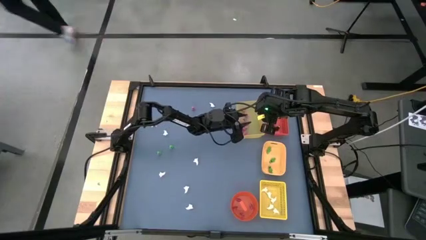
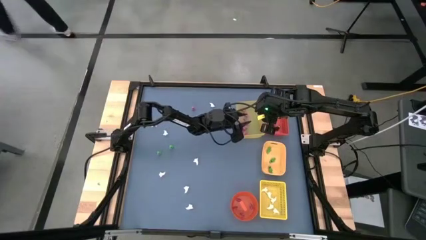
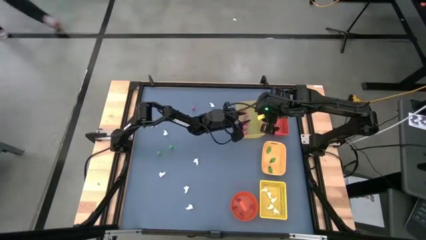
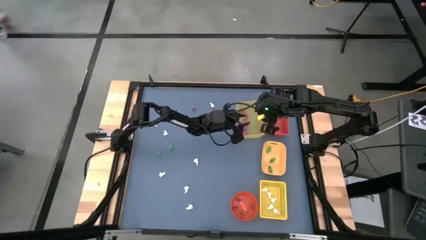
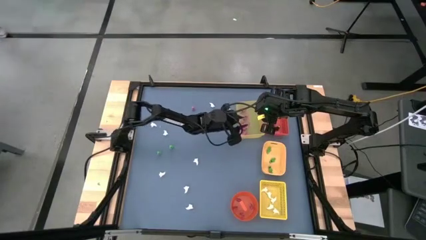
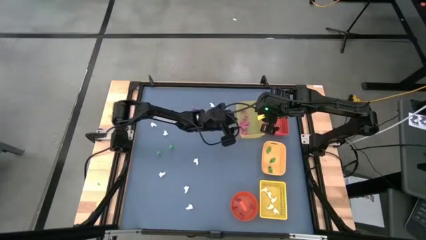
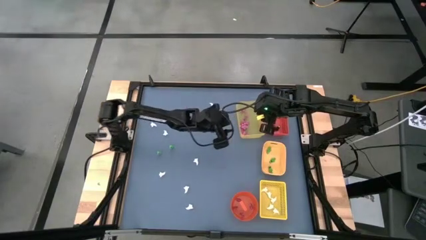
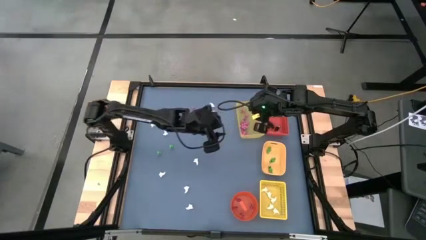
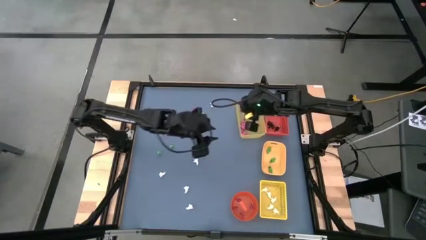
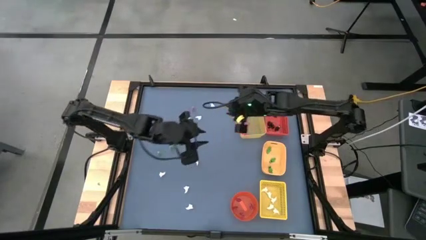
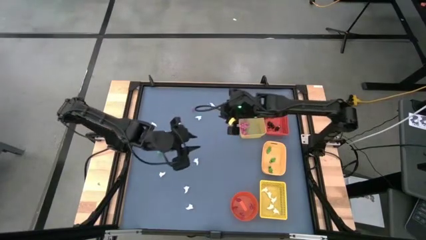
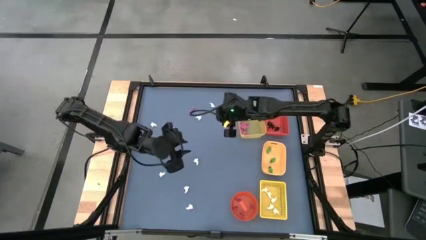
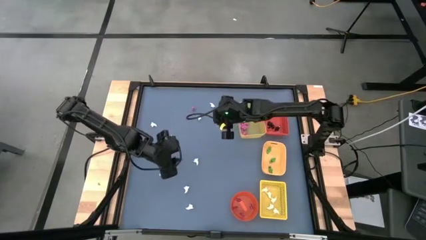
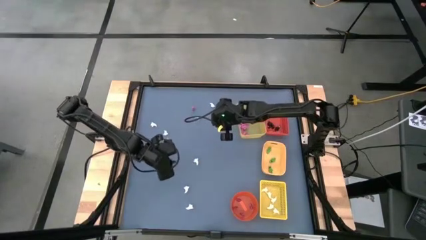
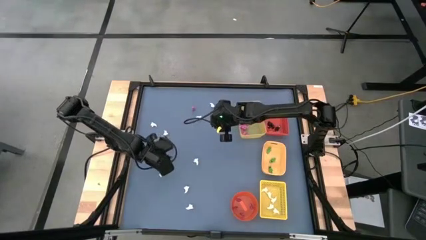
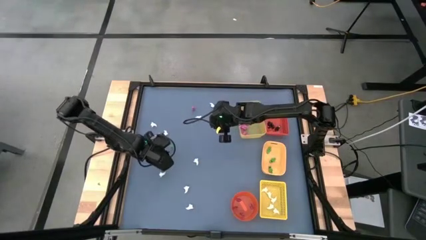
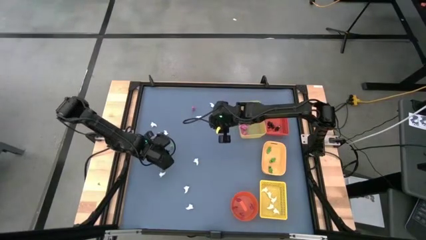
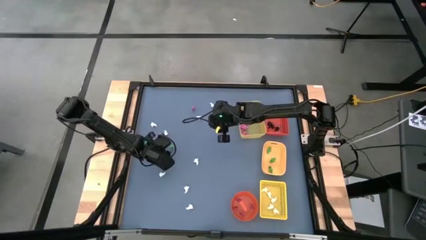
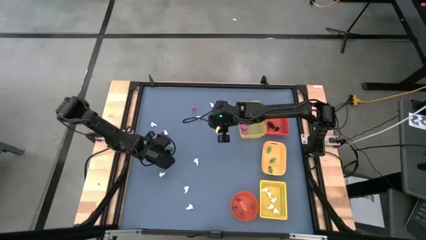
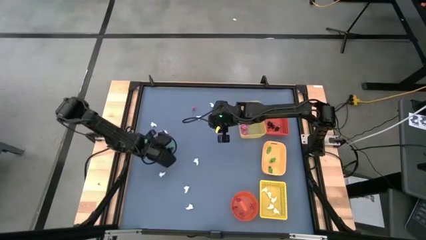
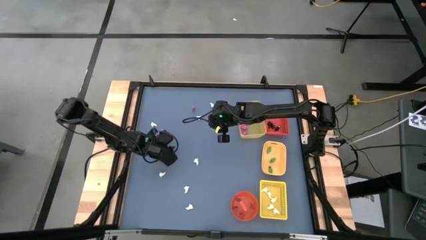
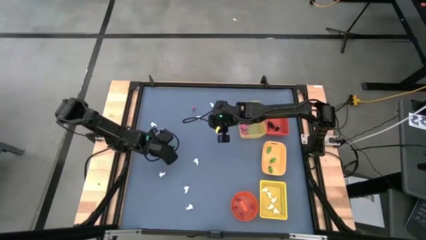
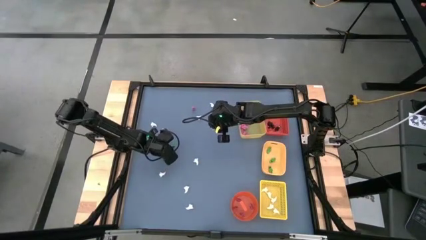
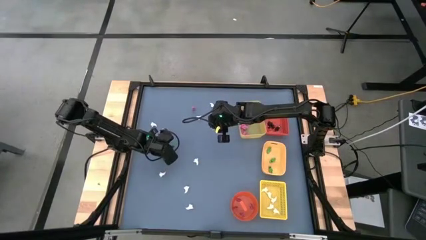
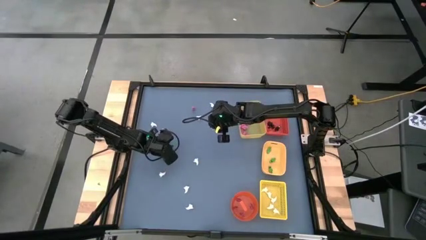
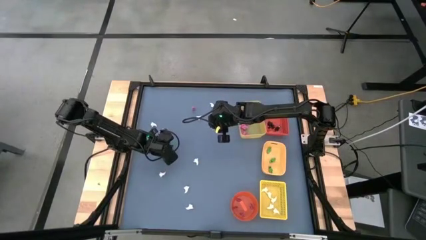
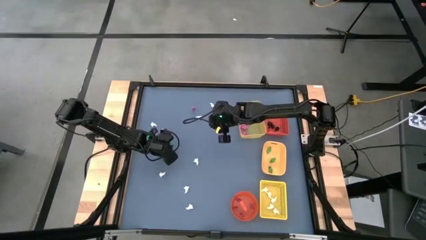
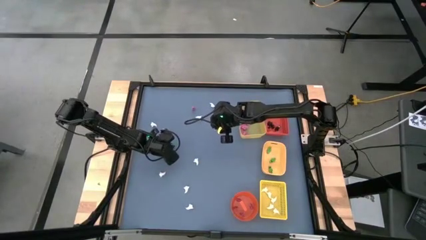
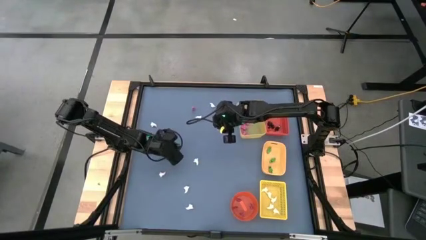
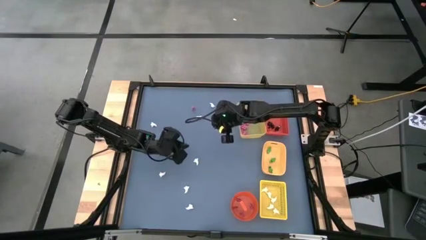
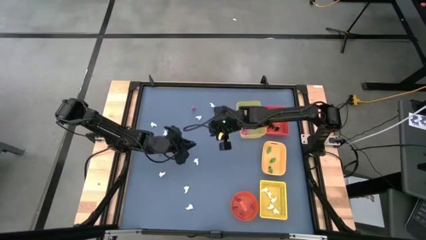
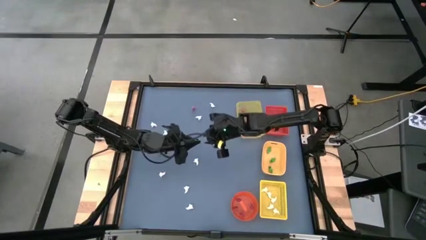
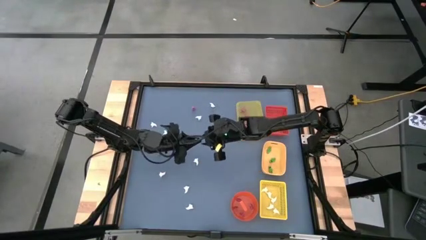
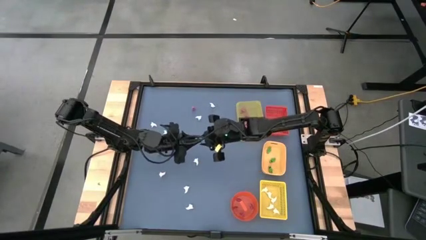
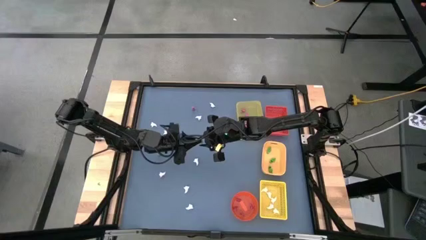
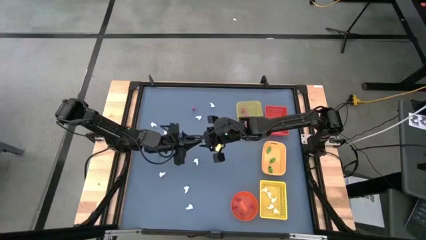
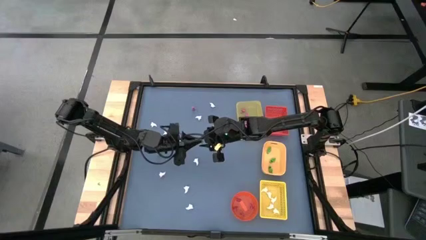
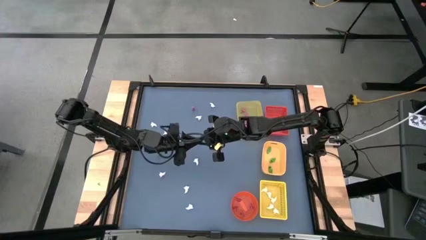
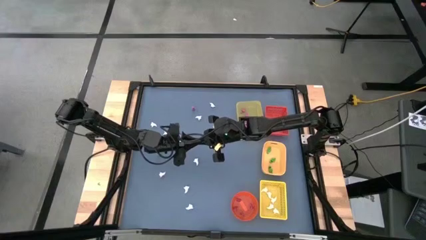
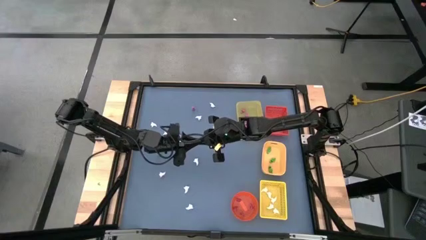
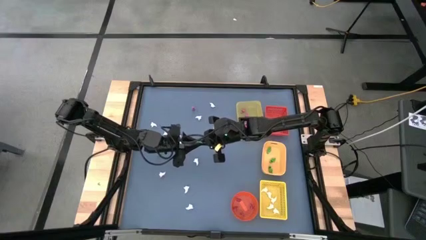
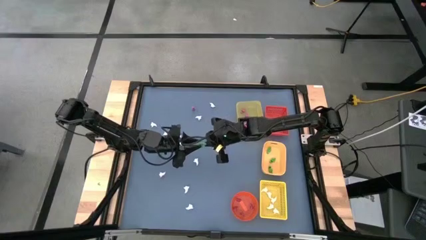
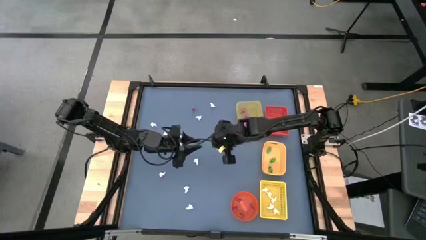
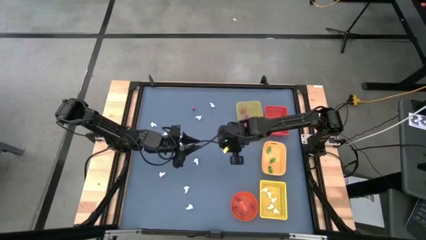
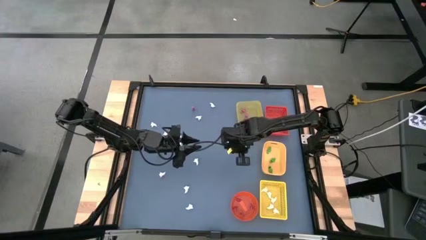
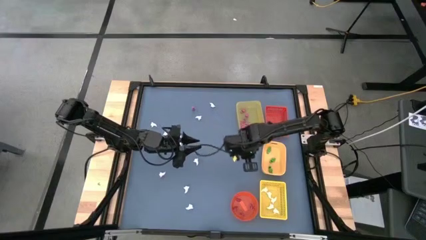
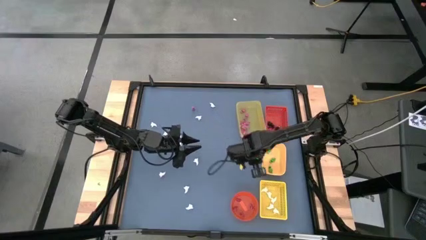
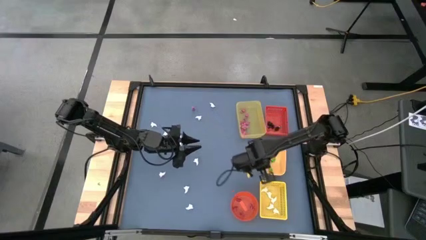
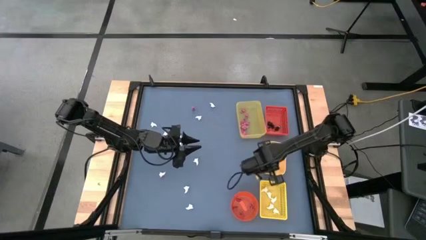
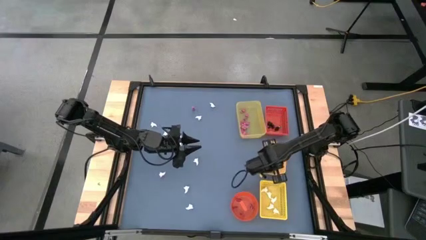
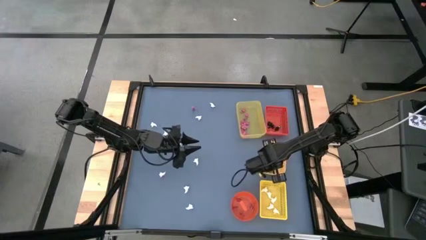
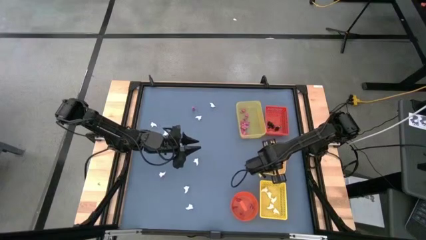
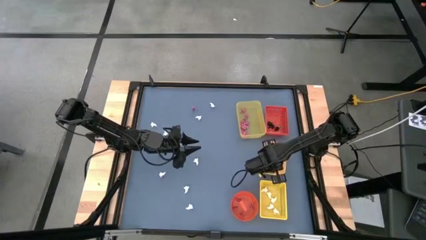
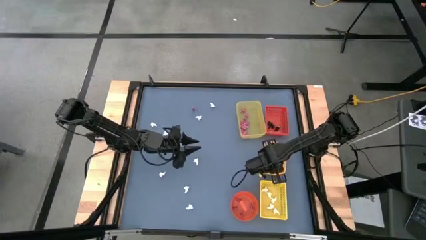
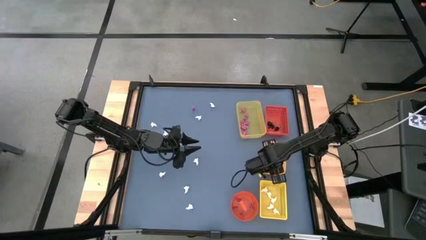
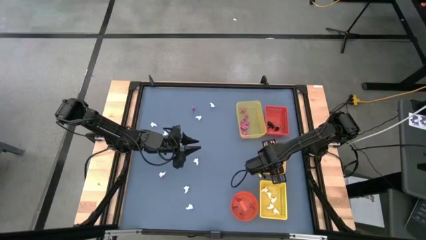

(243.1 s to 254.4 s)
Task: Sort Halloween decoration
Put the green skeleton toy into the middle yellow bin
